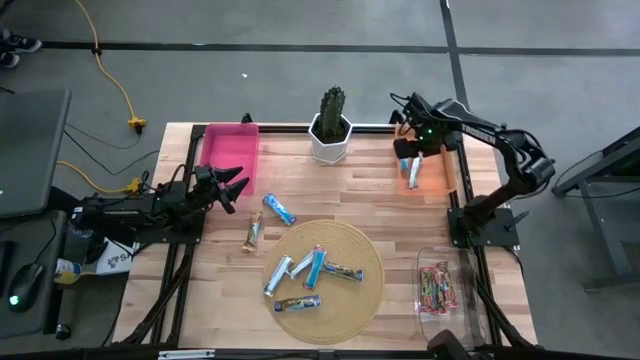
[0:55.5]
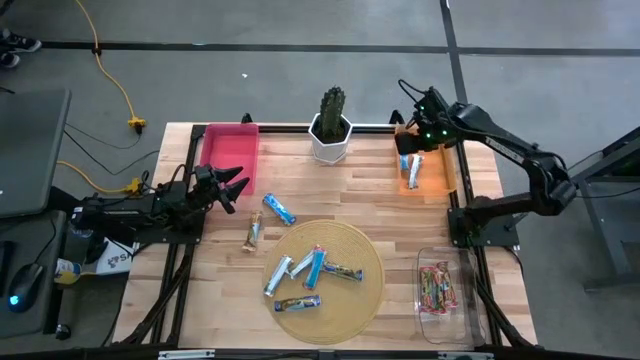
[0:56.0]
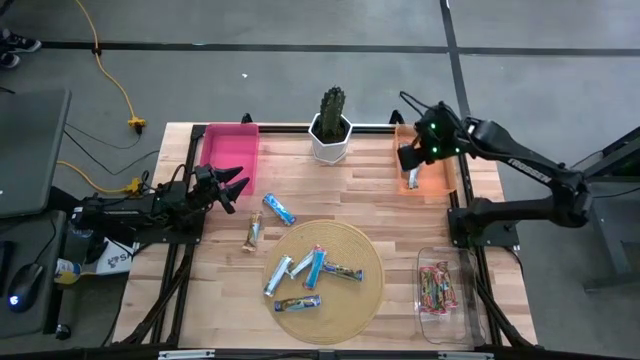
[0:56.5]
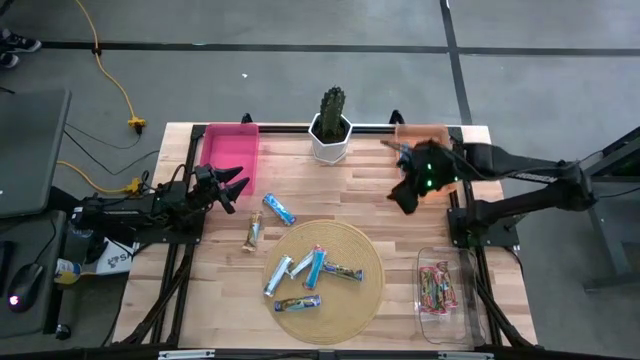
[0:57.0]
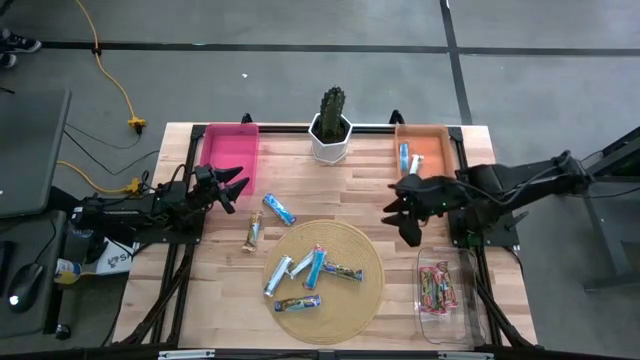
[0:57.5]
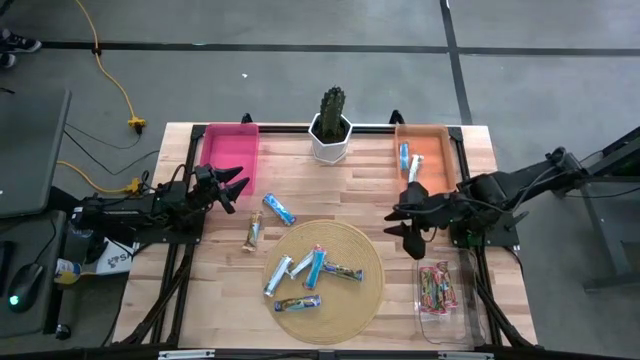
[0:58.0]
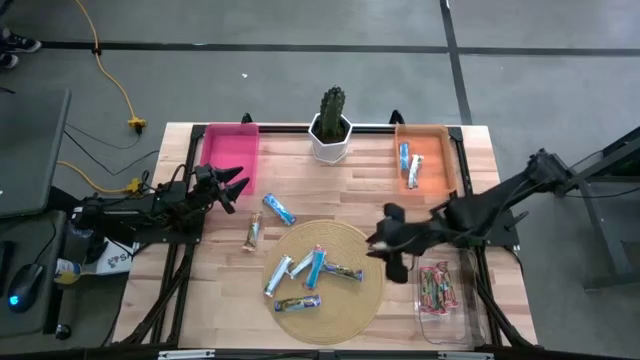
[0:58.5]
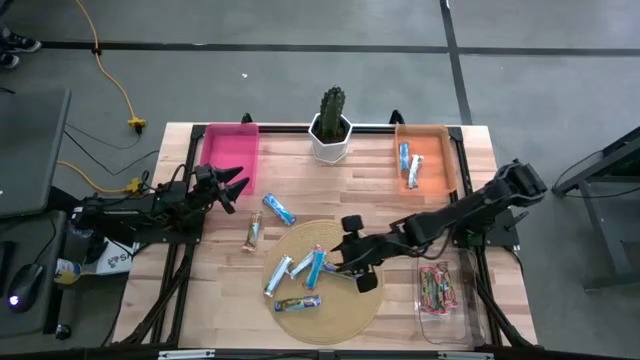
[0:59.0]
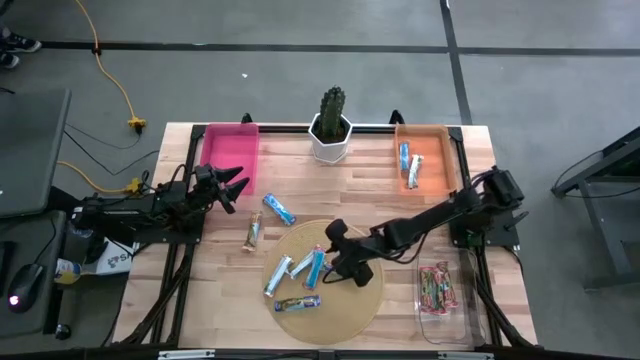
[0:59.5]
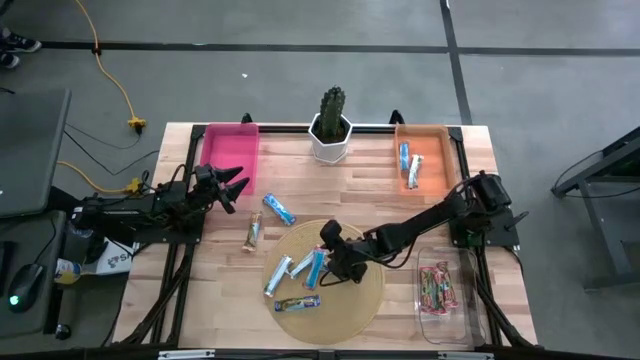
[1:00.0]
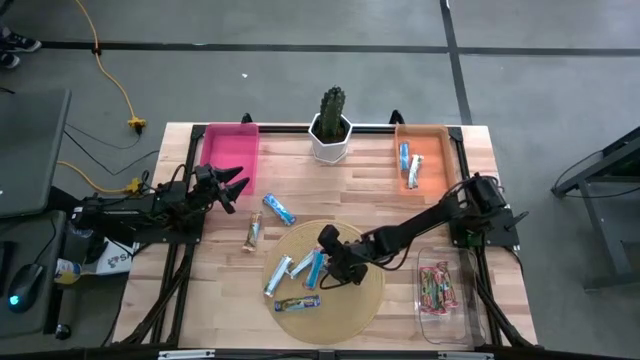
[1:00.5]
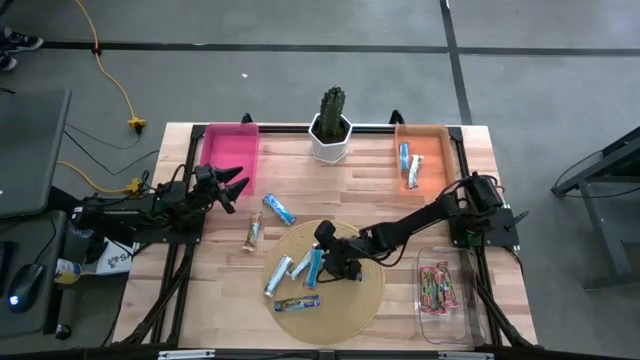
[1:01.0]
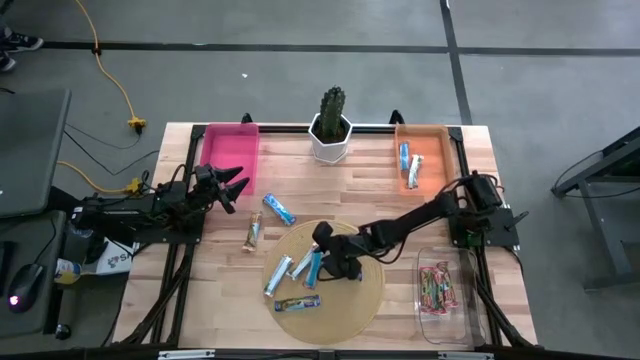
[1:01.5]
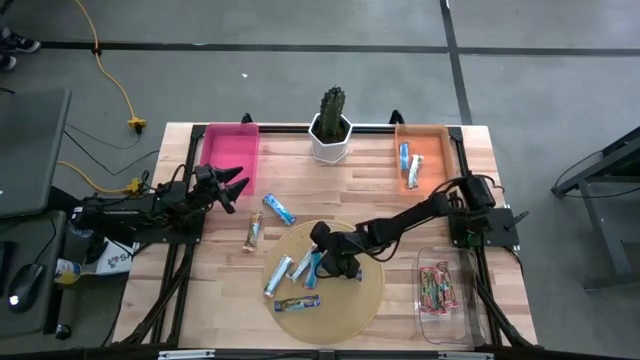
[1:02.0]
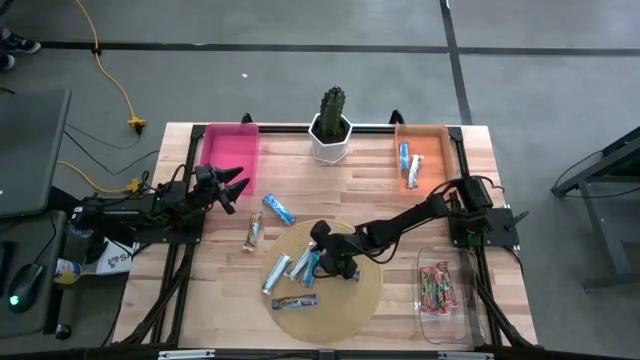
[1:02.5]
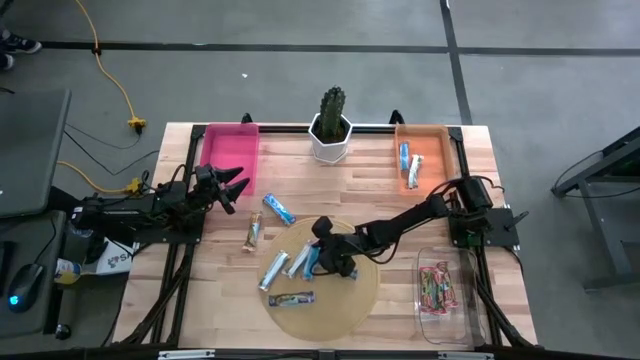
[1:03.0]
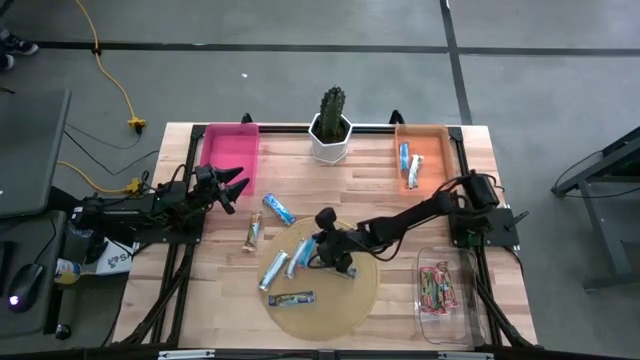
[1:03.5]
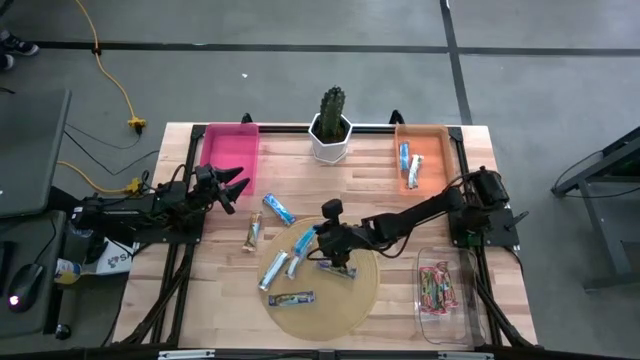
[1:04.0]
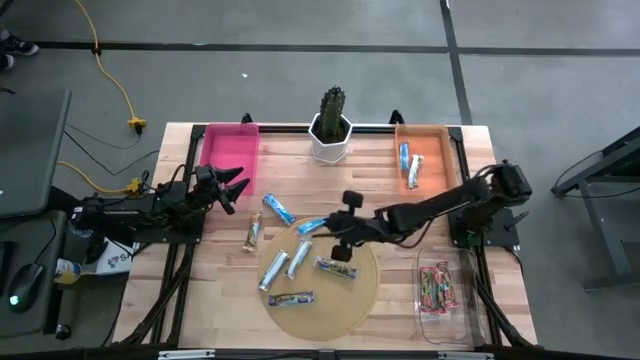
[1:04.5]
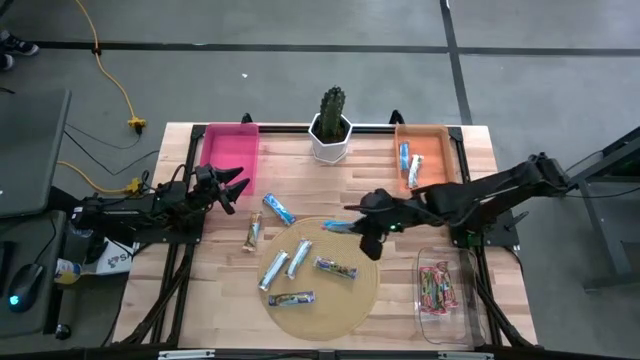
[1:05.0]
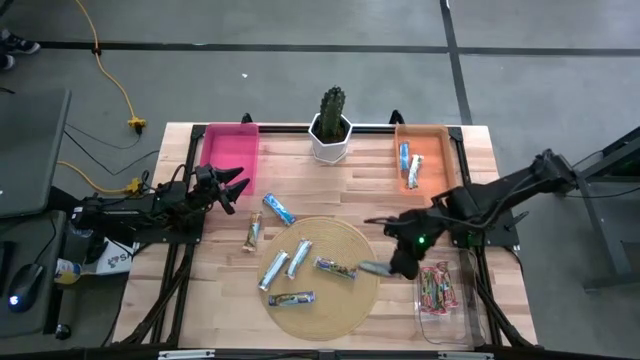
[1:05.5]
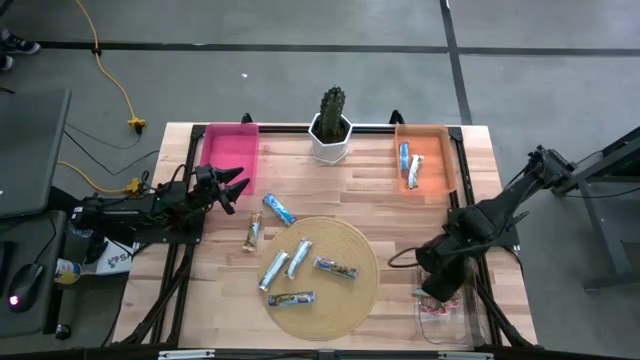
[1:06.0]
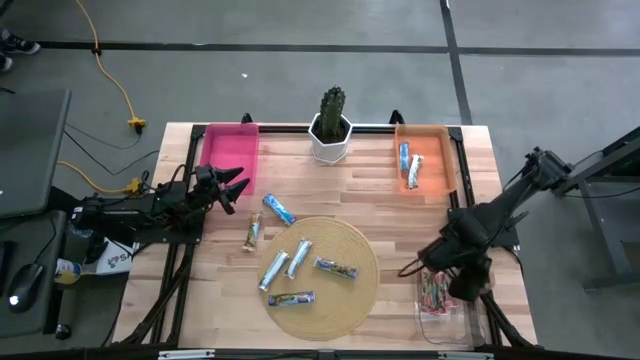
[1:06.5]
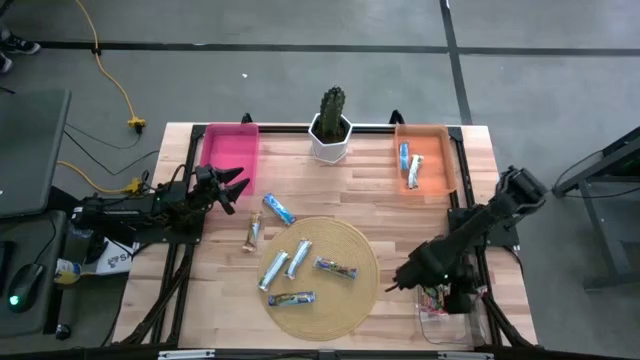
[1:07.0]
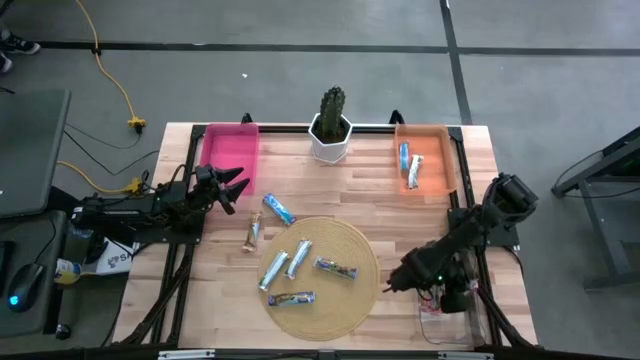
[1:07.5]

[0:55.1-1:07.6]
Task: Pick and place Granola Bars by type
Put the red granola bar into the transparent bin

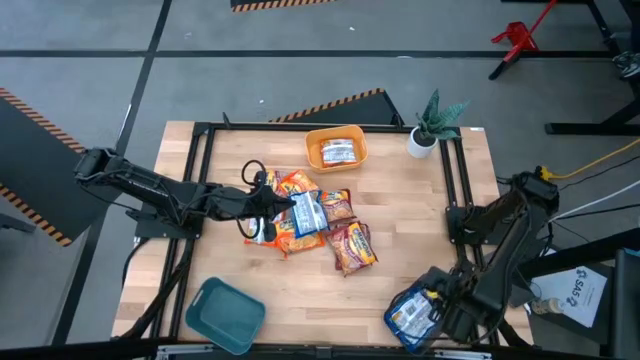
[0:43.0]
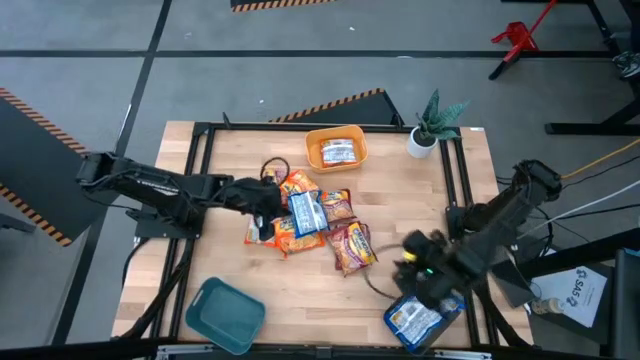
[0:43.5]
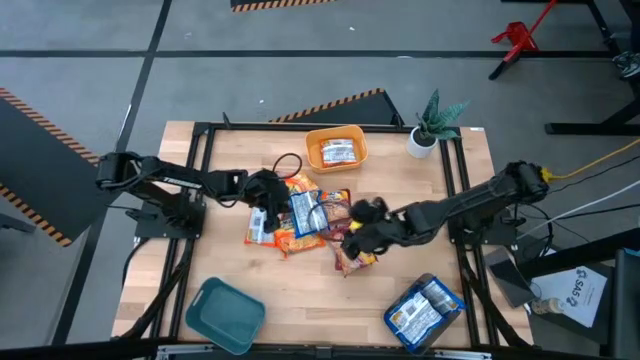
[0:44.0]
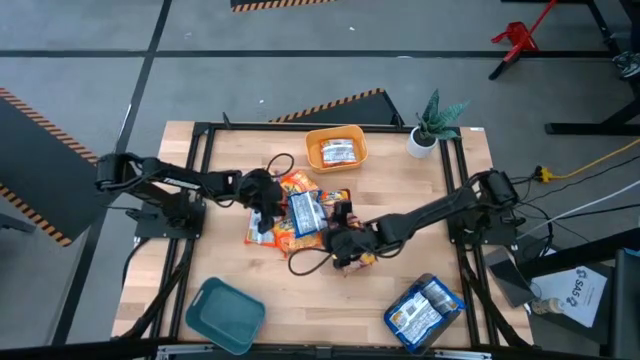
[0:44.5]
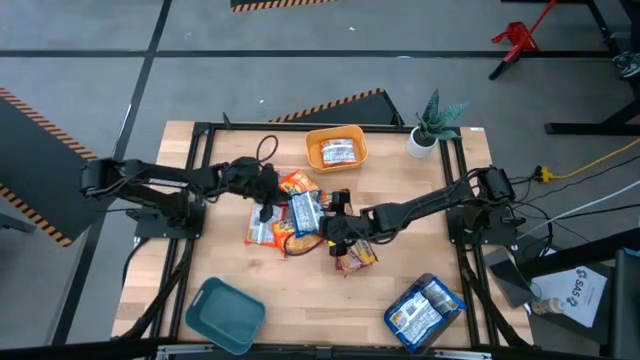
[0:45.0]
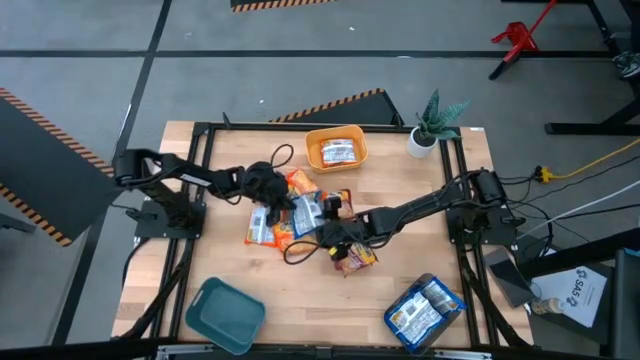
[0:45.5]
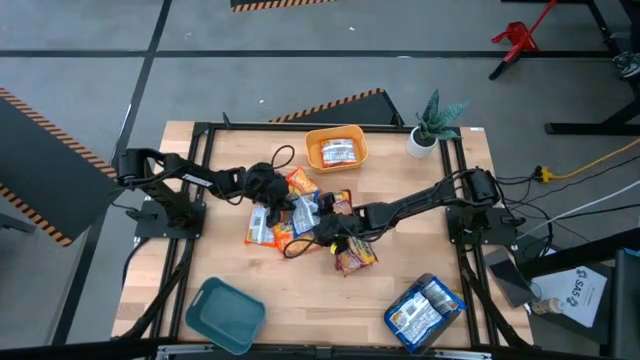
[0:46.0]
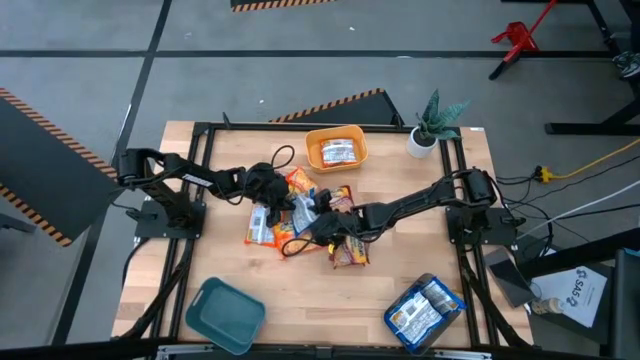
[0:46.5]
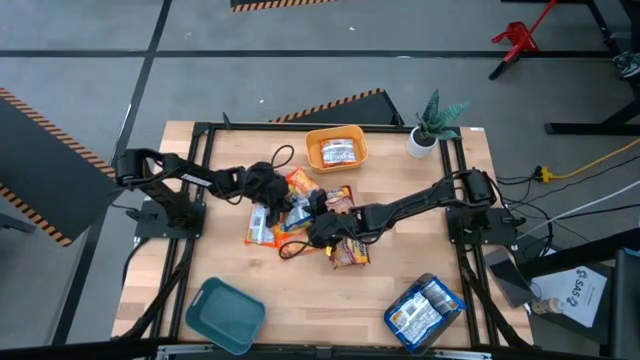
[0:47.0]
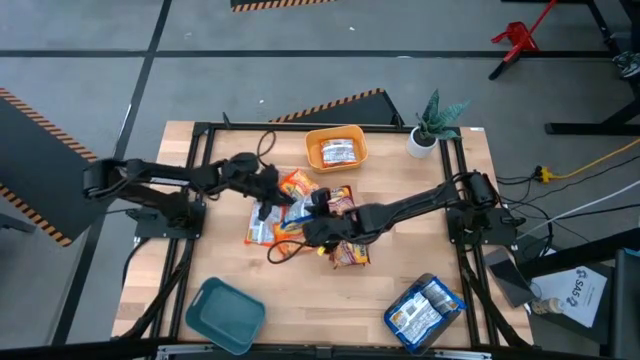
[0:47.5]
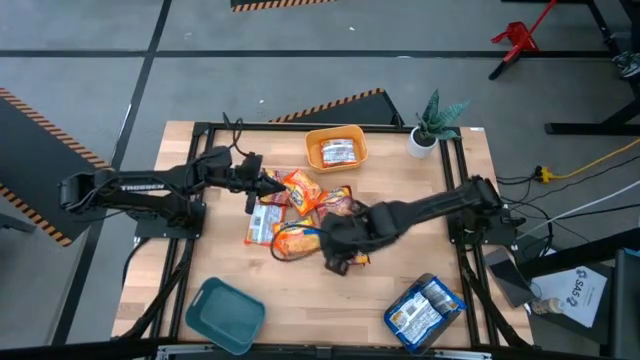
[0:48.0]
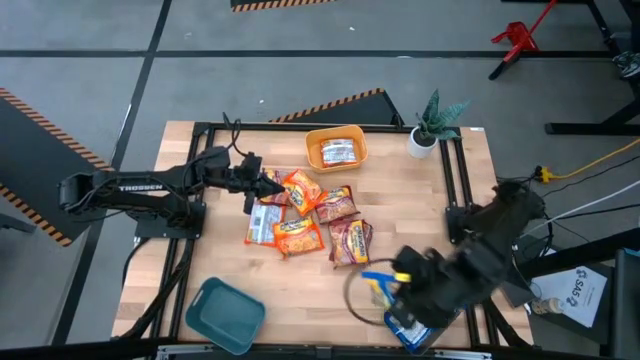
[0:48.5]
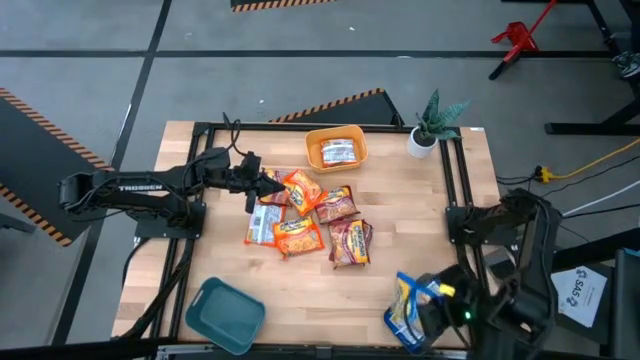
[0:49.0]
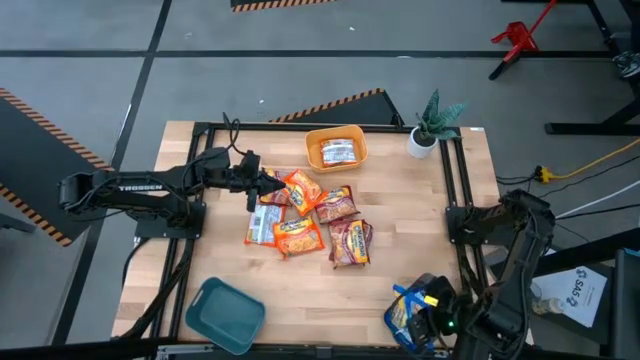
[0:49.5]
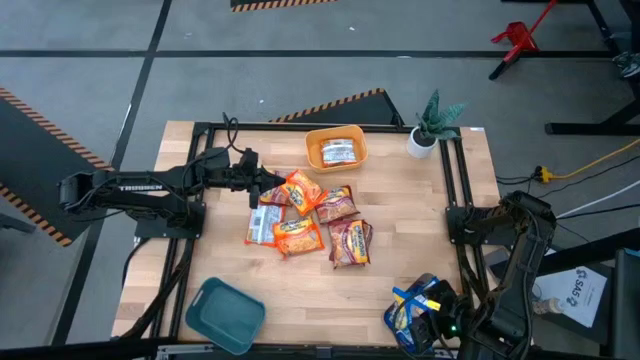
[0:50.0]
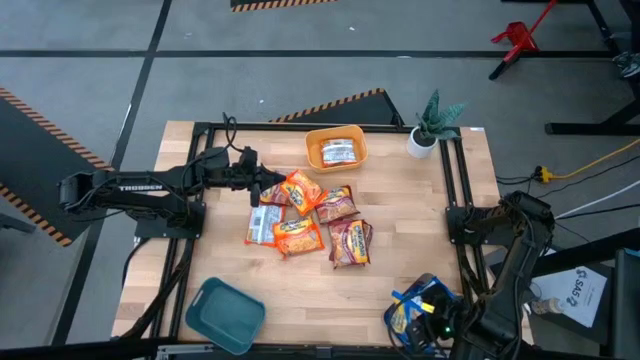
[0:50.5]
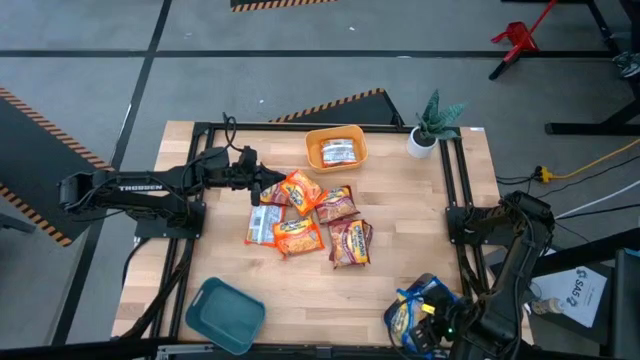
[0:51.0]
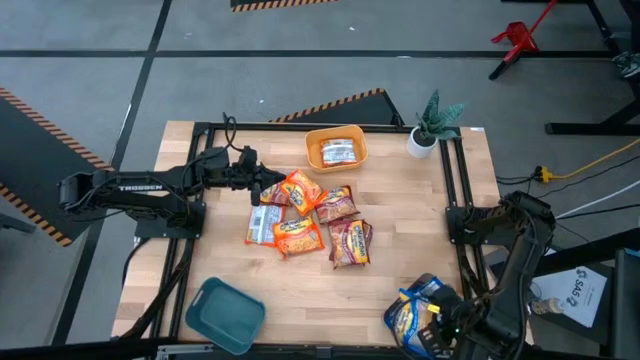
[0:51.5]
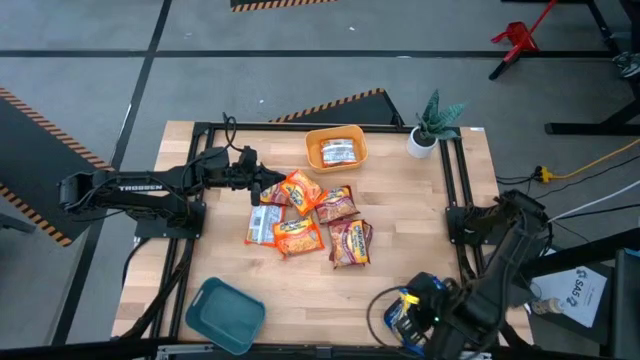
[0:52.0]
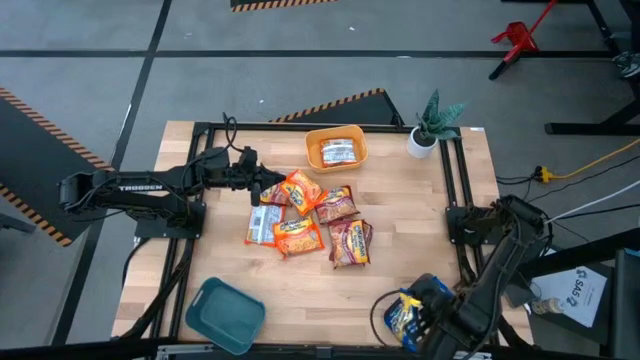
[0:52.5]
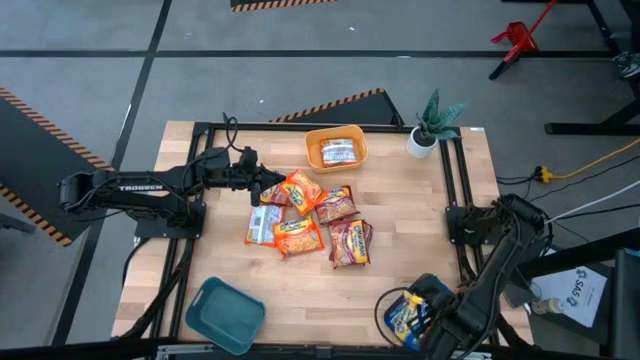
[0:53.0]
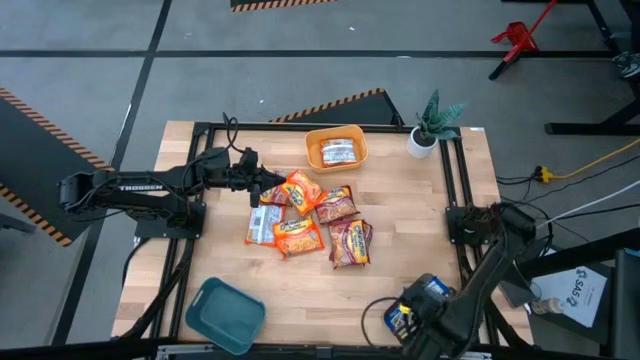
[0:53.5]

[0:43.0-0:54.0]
Task: Sort Maruchan noodles
Put the blue noodle pack into the black bin
